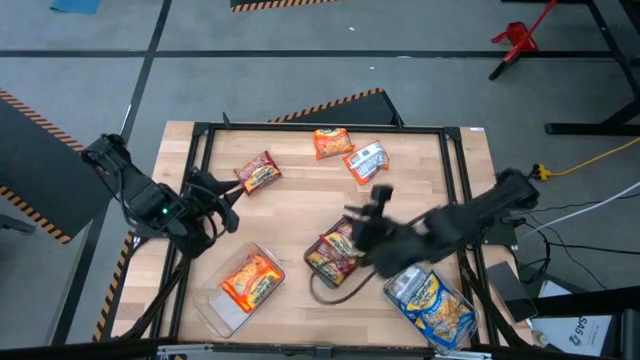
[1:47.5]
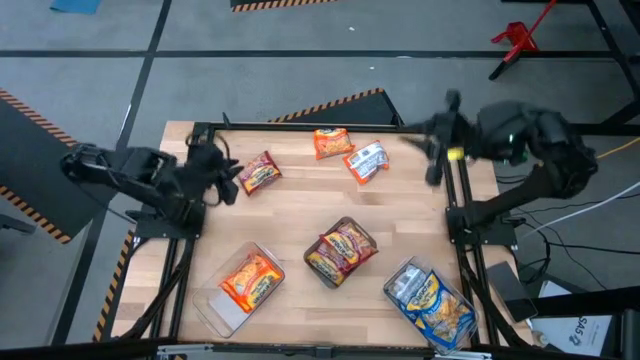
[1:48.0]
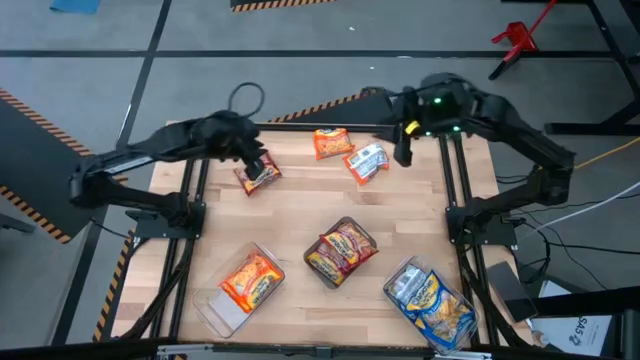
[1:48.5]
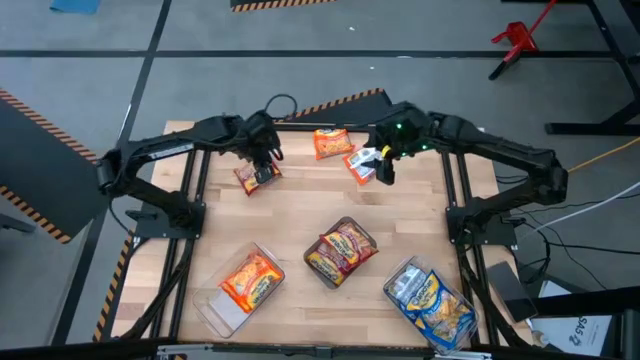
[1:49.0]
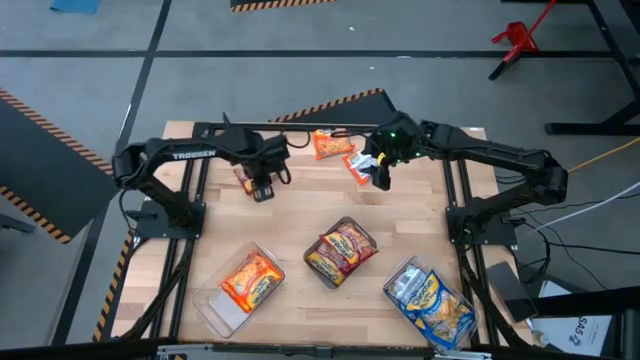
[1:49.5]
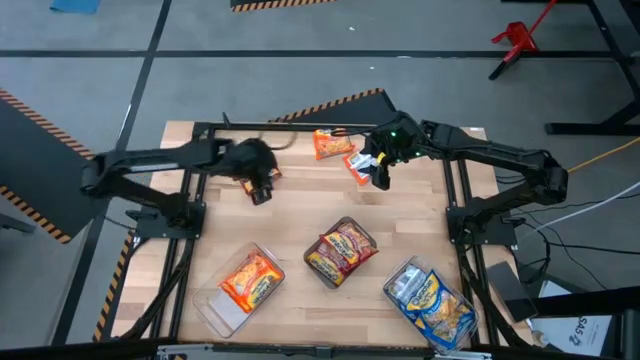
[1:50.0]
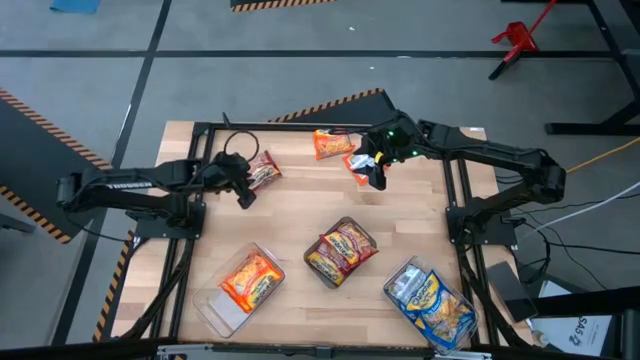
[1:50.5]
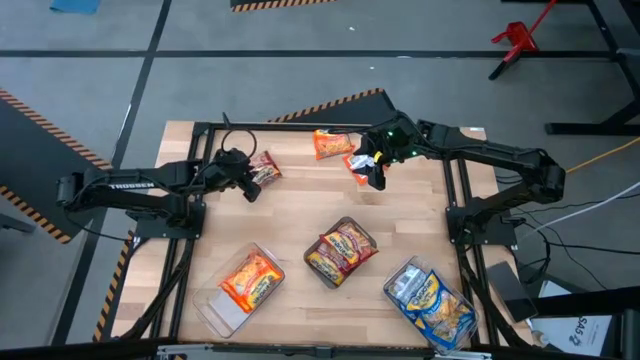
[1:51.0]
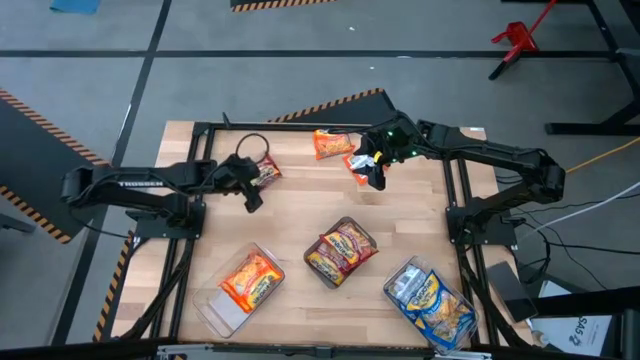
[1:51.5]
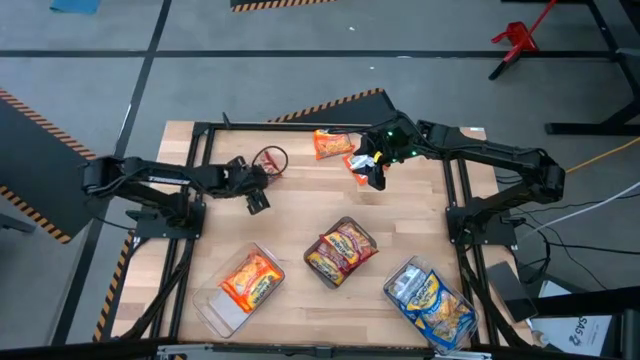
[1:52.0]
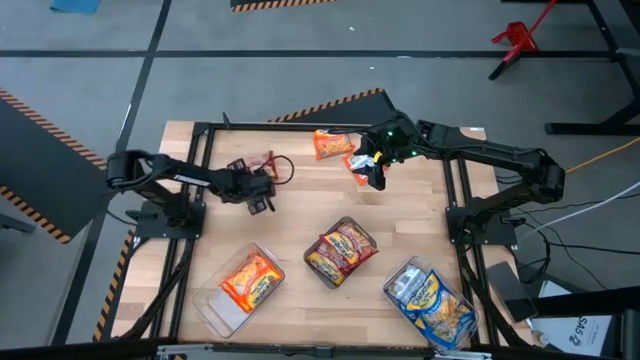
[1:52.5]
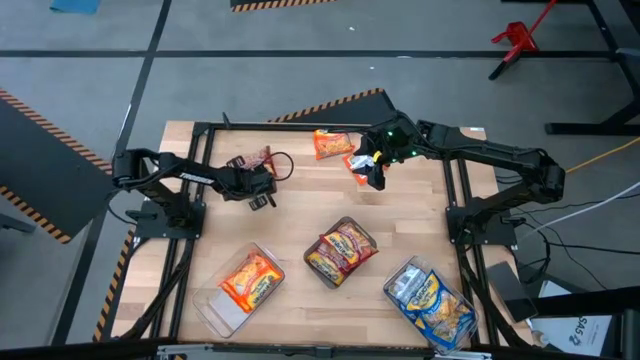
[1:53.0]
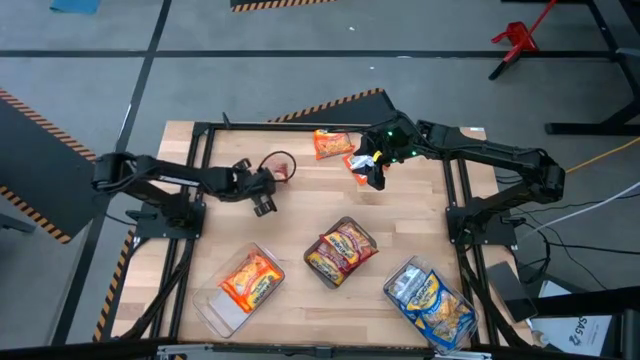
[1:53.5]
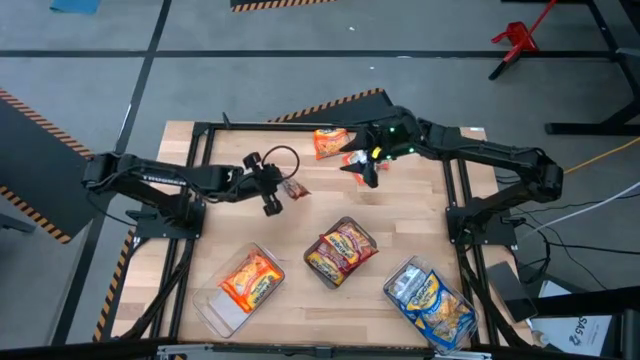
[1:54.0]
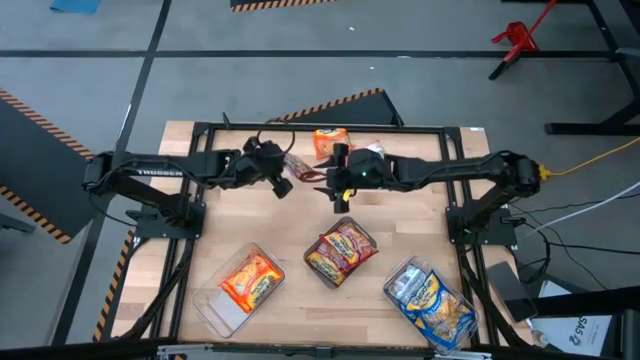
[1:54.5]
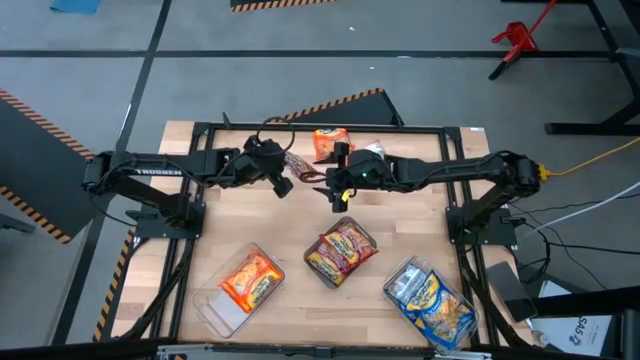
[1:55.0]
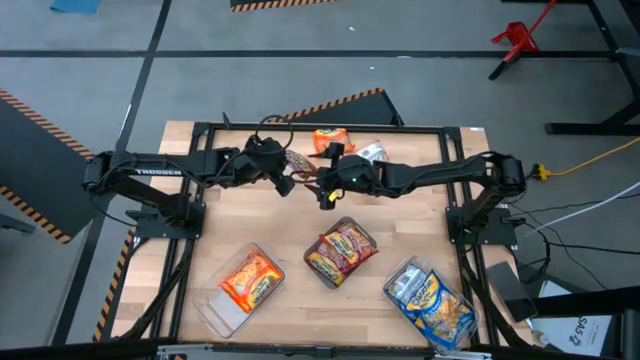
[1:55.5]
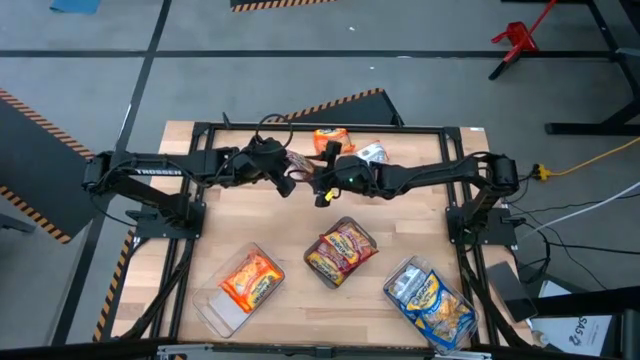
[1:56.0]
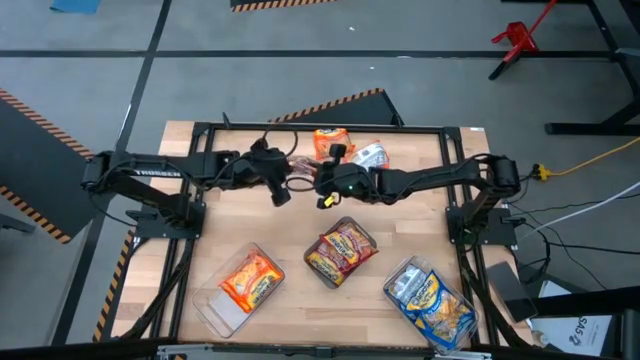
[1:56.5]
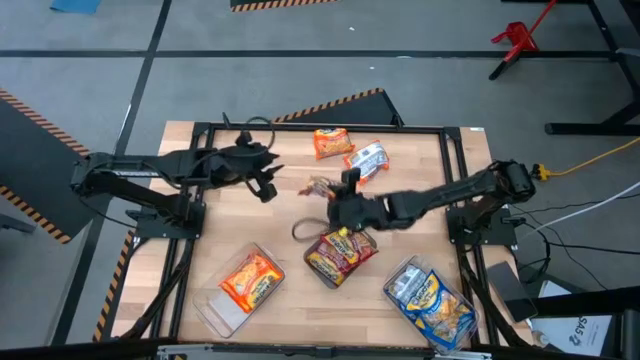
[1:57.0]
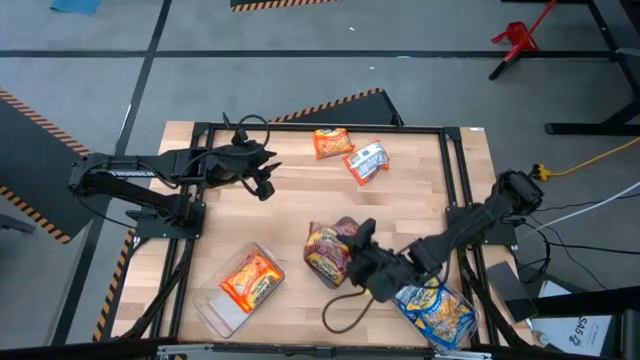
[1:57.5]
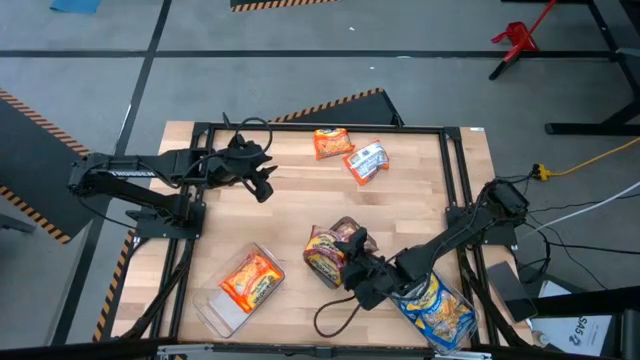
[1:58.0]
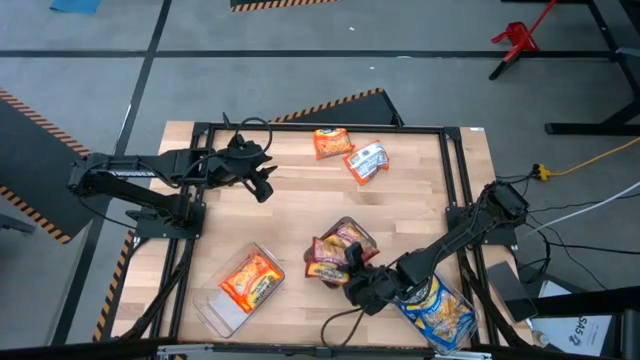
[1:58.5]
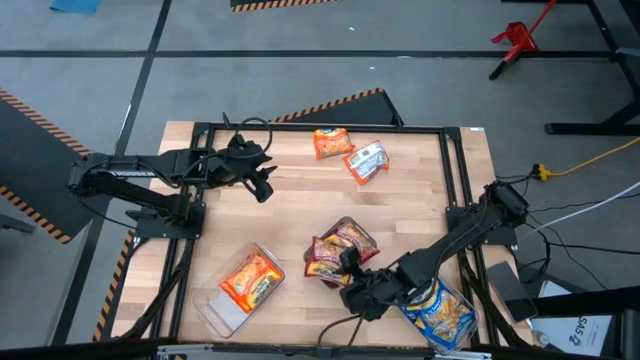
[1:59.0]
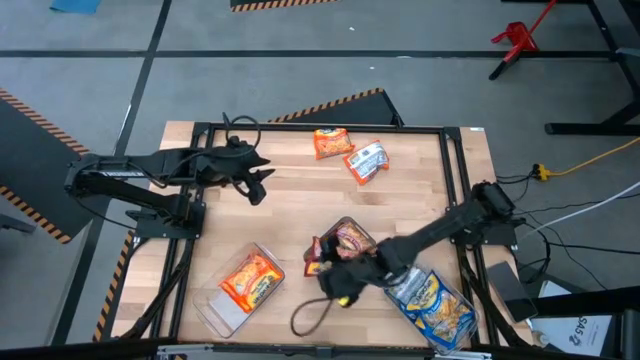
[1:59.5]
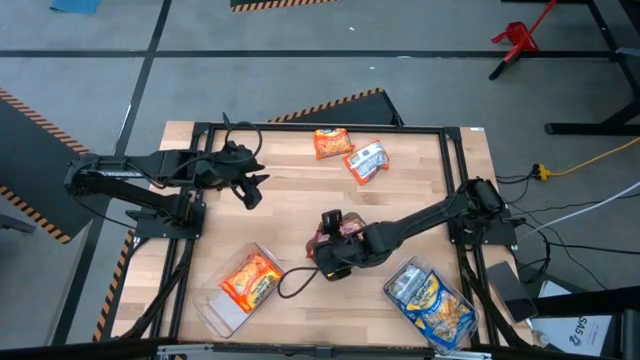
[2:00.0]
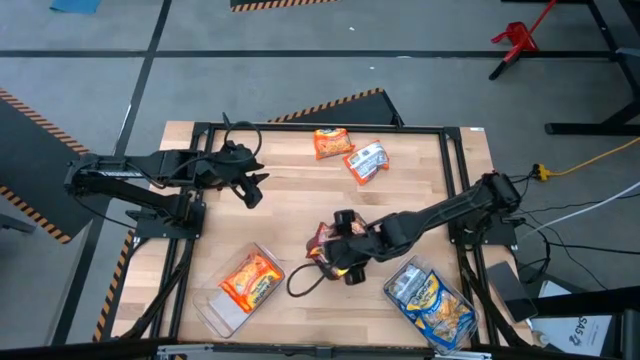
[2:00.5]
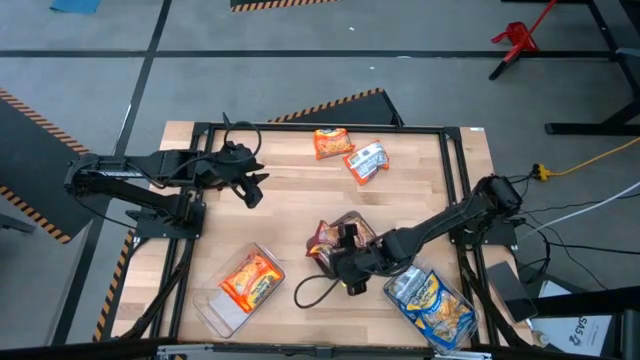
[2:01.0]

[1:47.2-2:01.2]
Task: Sort Maruchan noodles
Put the red noodle pack into the black bin

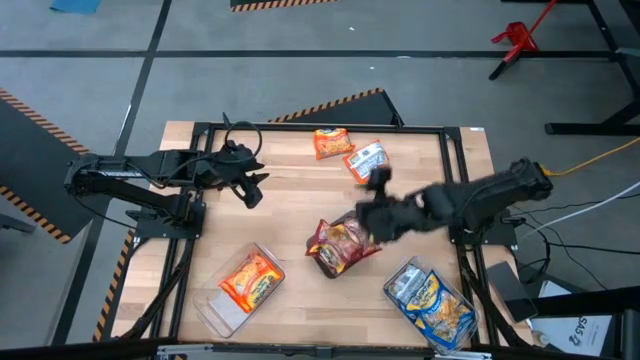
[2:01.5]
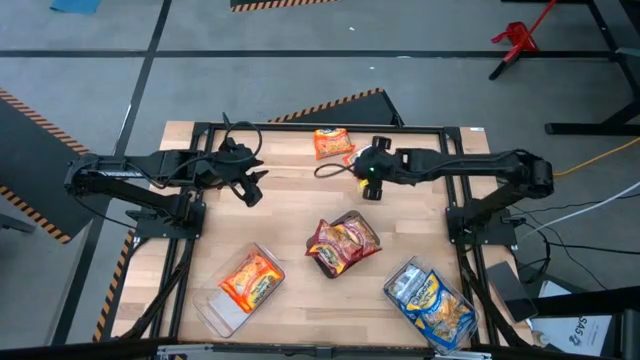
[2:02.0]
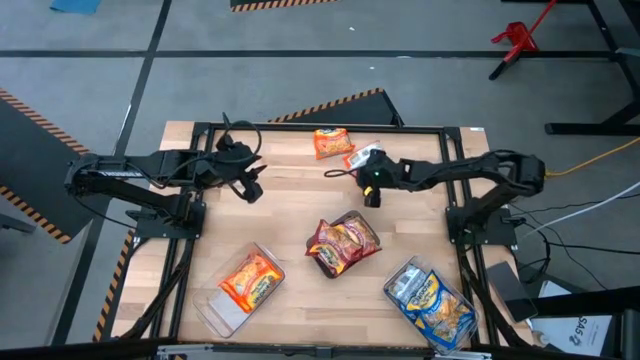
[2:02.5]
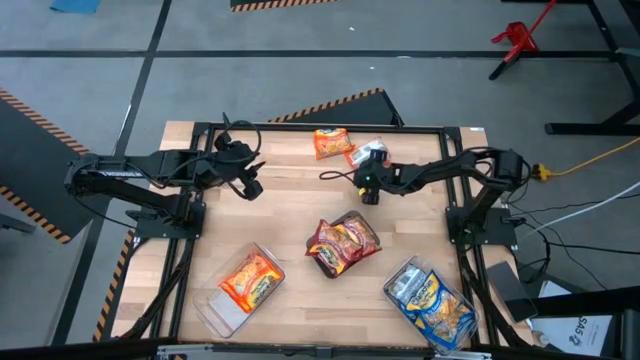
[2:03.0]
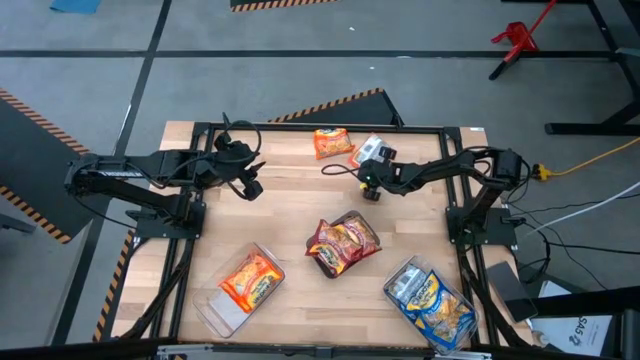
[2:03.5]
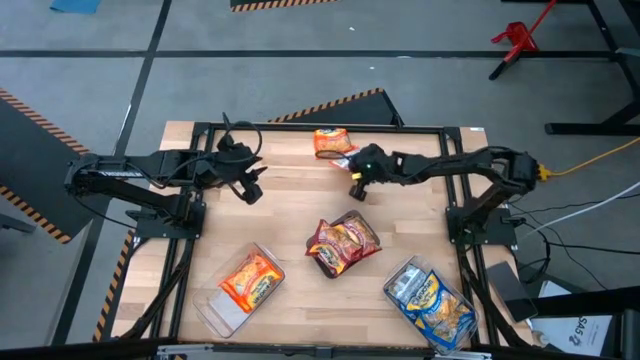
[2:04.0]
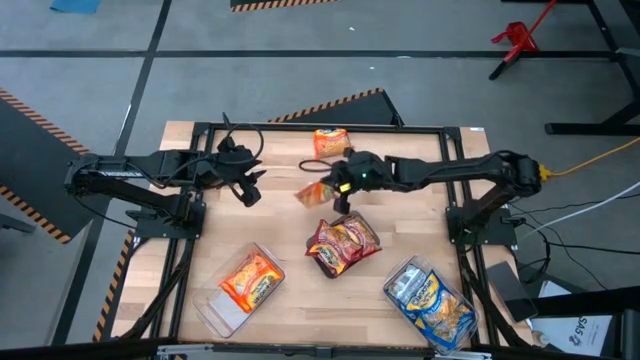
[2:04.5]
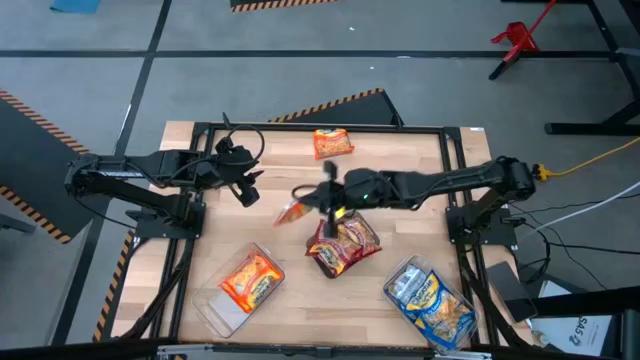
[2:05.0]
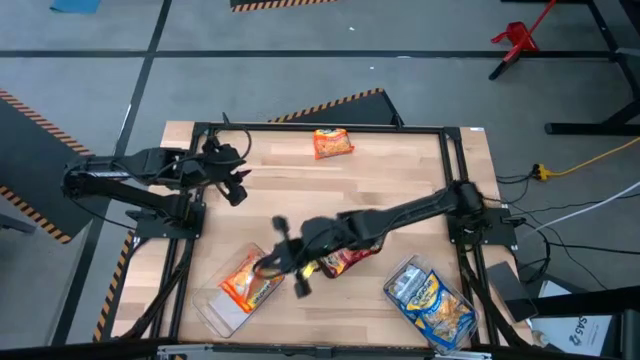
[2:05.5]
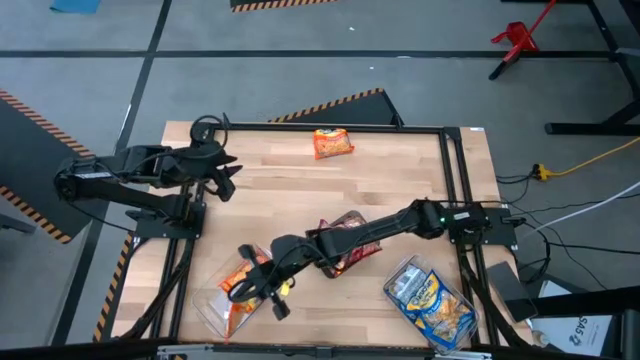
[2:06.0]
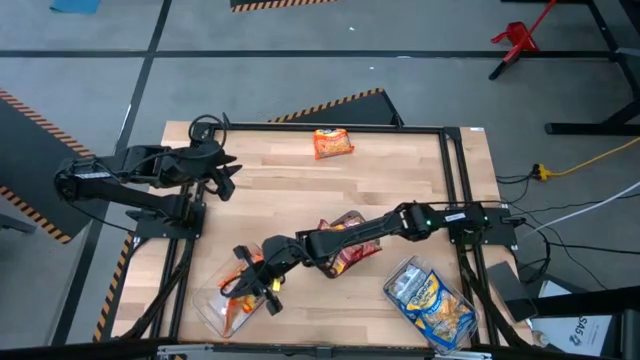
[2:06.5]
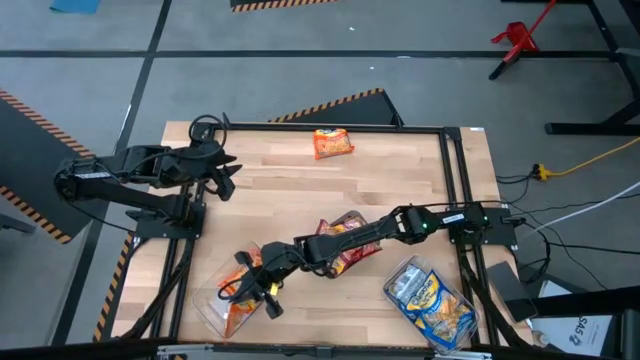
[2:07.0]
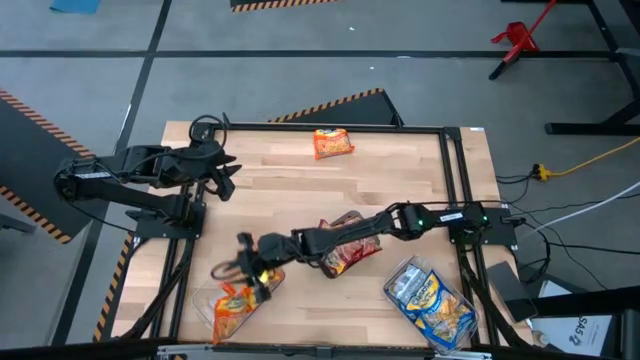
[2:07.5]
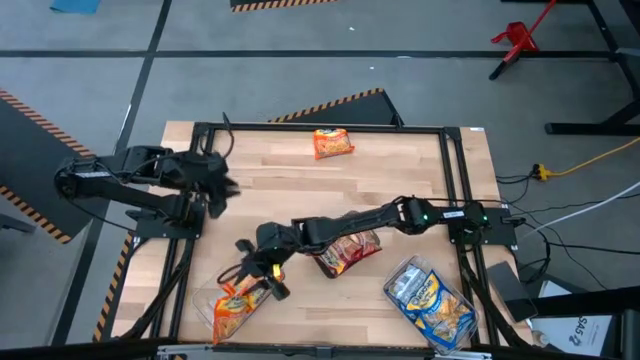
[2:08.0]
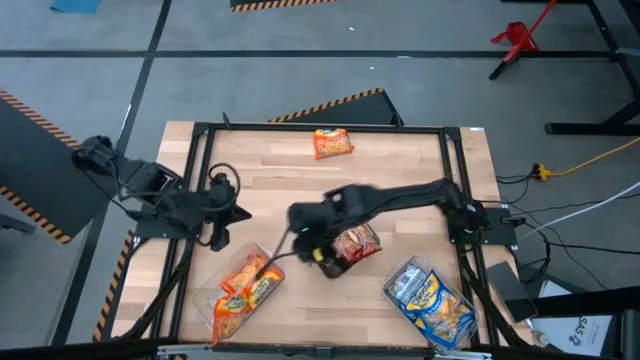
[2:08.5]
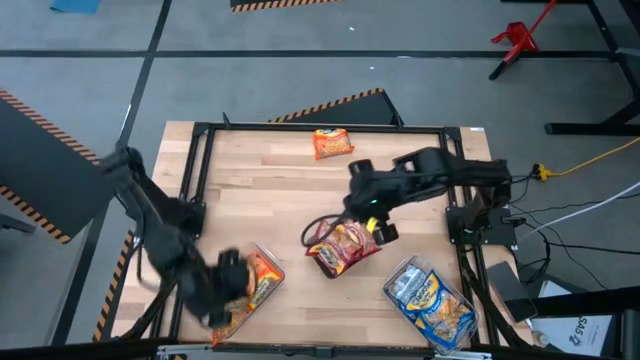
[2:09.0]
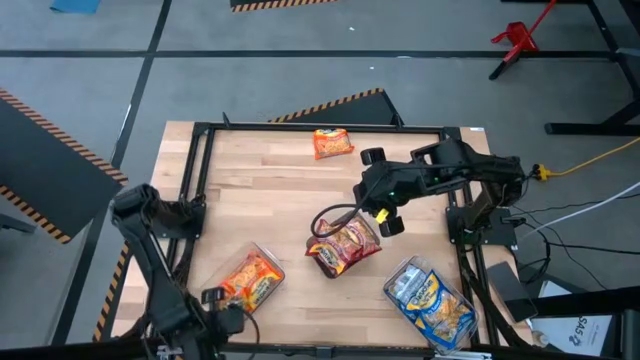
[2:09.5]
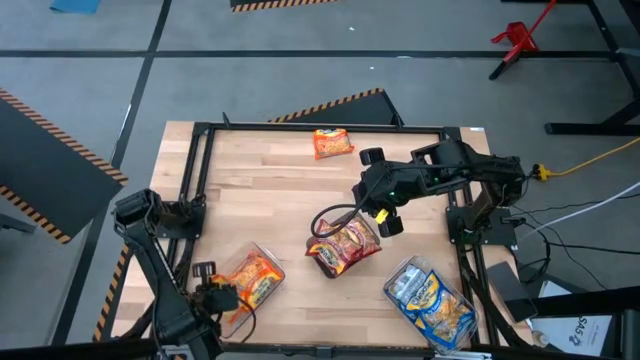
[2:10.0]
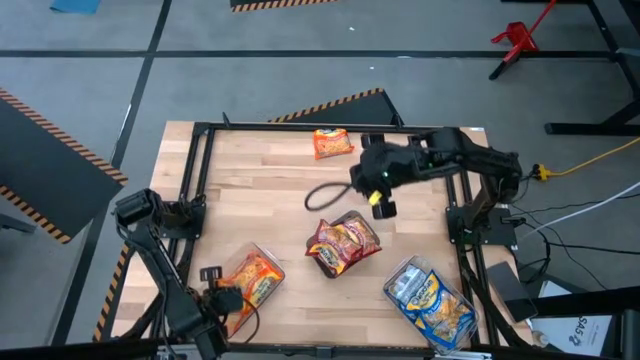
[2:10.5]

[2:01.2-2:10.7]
Put the orange noodle pack into the left transparent bin
